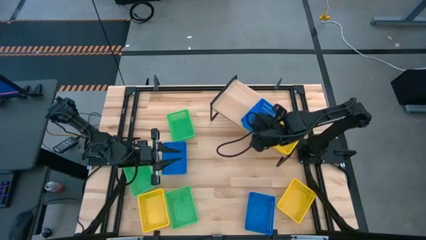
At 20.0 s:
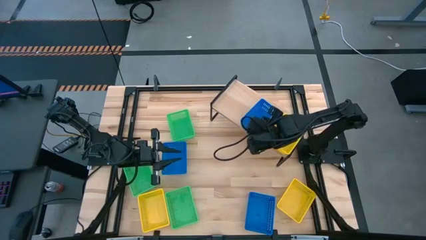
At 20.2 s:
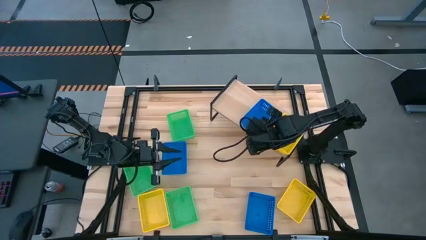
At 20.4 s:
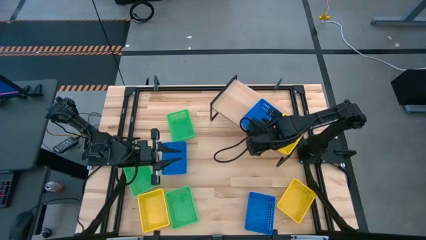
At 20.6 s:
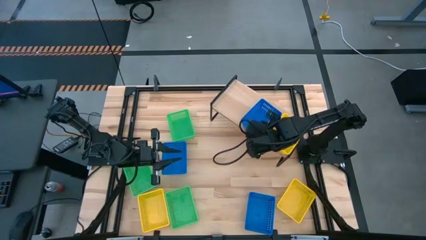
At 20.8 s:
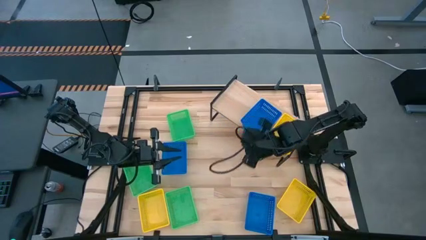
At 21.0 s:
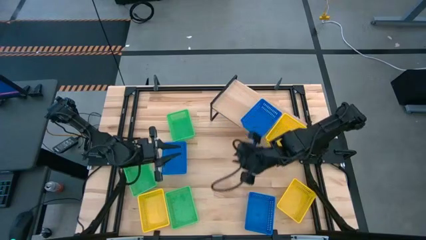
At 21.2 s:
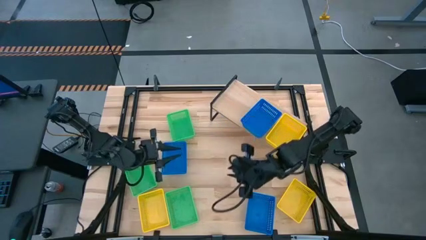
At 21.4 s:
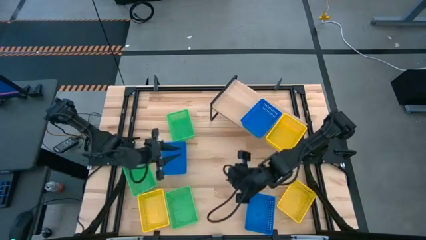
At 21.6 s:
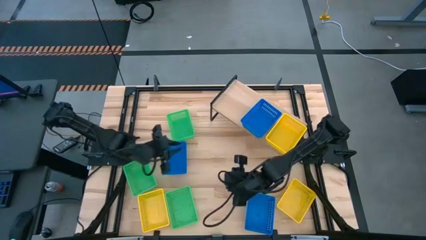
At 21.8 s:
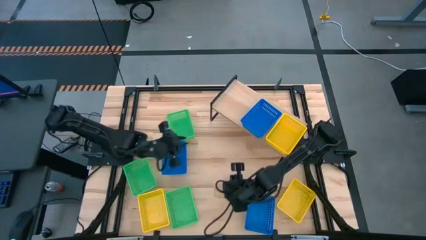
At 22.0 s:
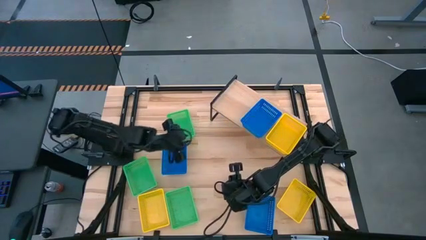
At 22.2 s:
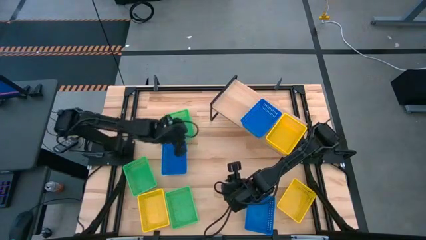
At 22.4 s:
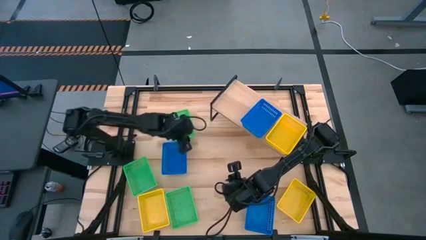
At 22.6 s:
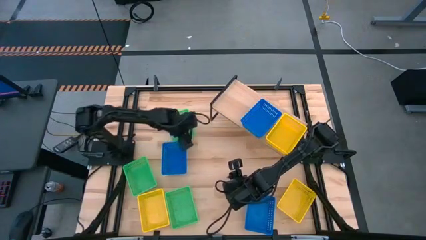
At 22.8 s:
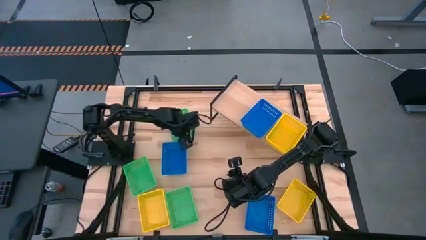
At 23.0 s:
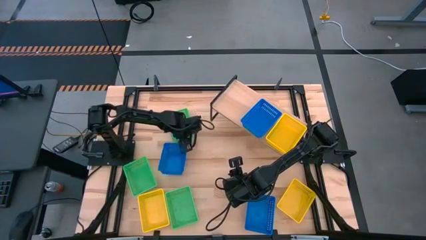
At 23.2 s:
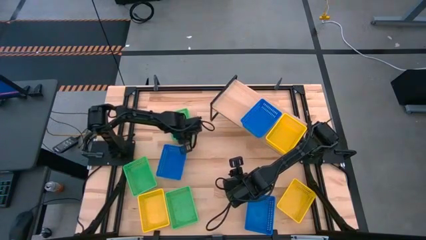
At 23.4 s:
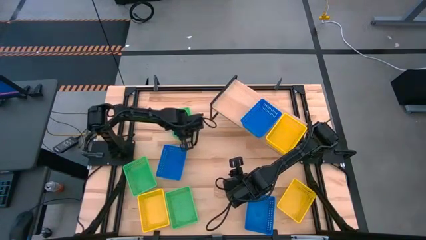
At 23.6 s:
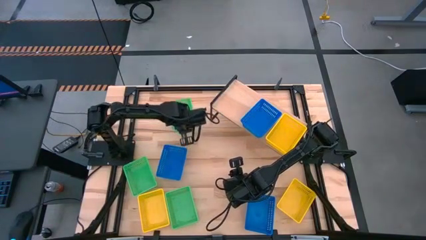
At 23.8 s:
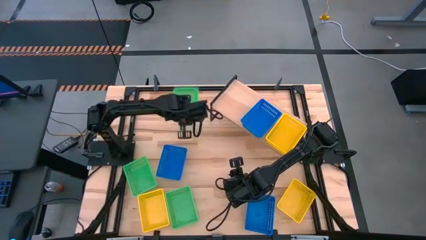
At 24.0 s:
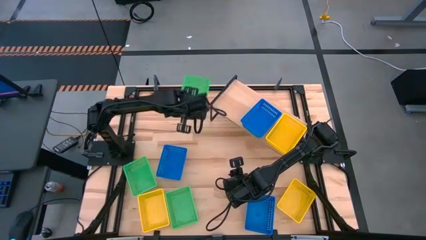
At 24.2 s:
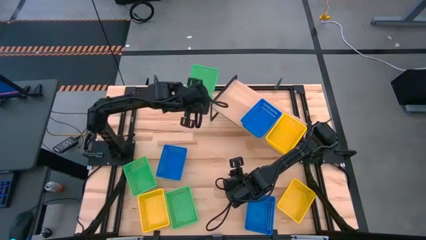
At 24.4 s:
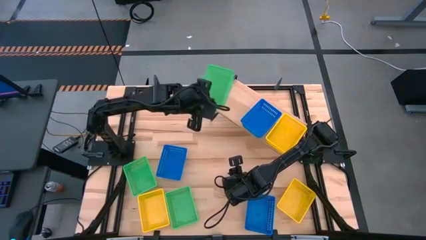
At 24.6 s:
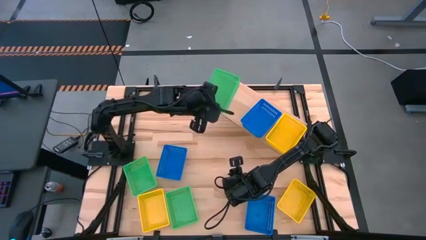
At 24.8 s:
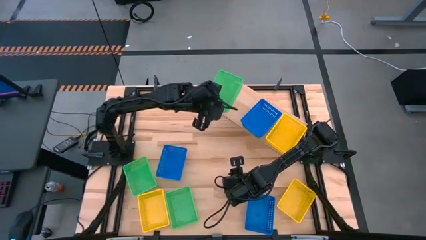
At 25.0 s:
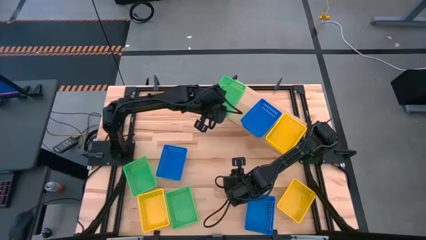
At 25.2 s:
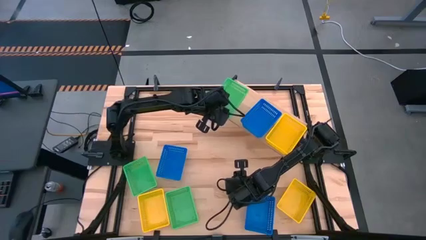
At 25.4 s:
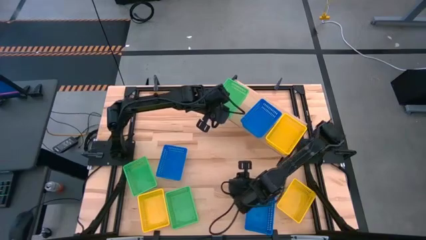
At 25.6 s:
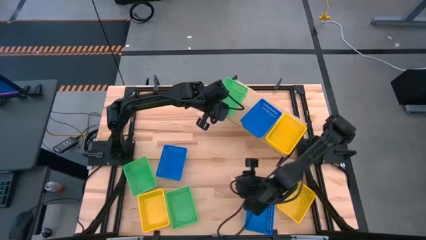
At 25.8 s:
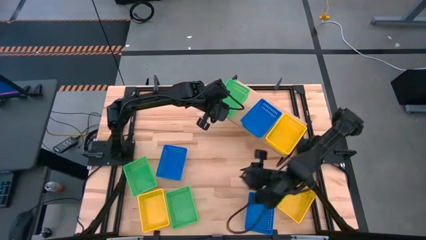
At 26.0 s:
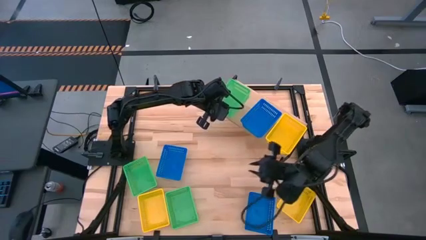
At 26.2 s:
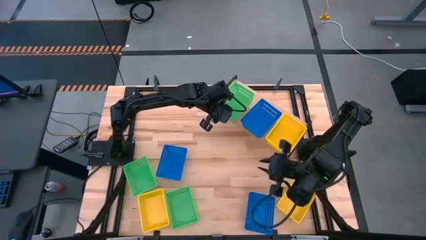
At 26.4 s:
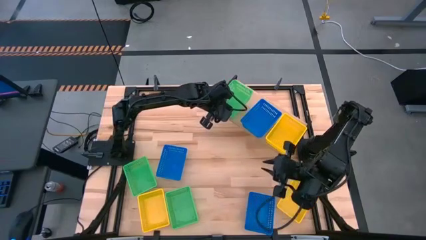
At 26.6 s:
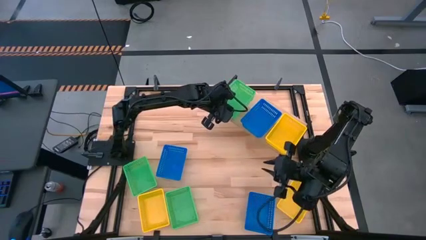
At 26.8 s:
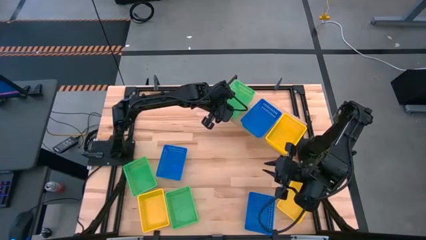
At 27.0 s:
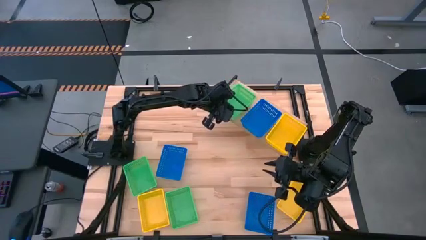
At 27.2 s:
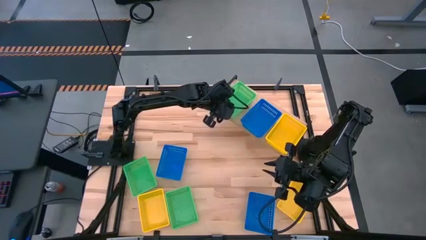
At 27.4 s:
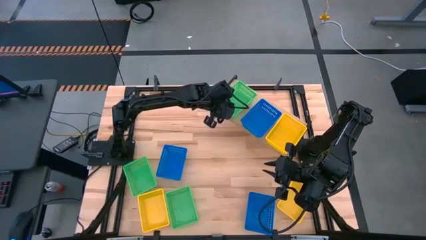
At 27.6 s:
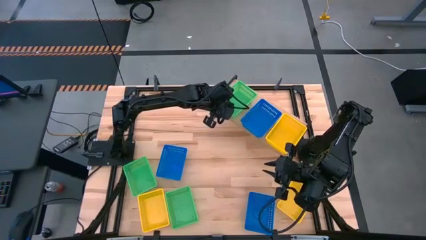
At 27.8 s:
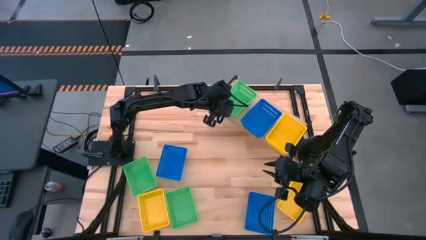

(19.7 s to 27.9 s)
Task: Stack baskets on shelf by color
Put the top green bin on the shelf

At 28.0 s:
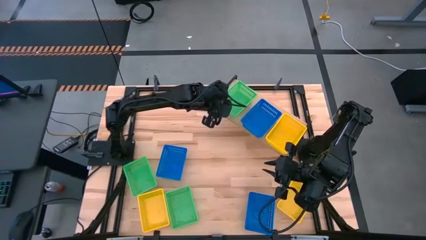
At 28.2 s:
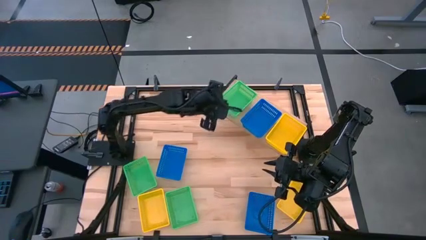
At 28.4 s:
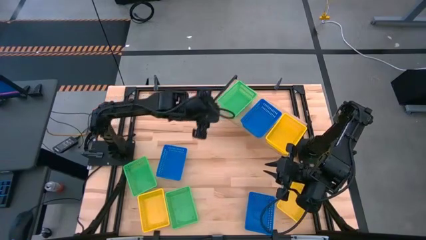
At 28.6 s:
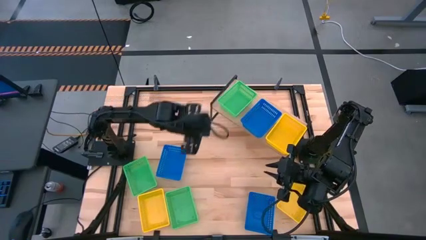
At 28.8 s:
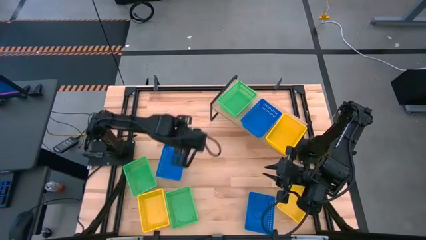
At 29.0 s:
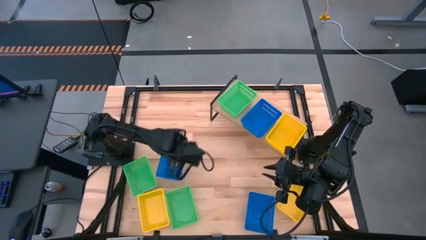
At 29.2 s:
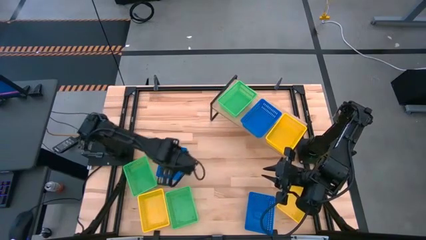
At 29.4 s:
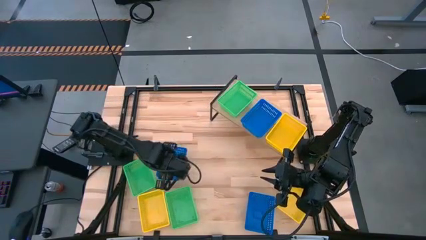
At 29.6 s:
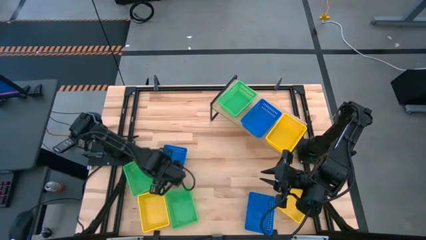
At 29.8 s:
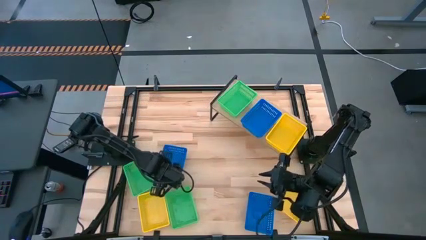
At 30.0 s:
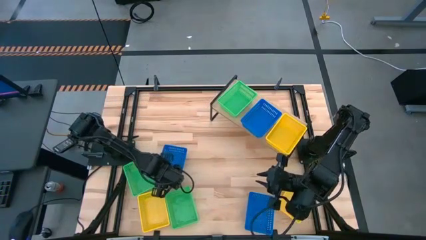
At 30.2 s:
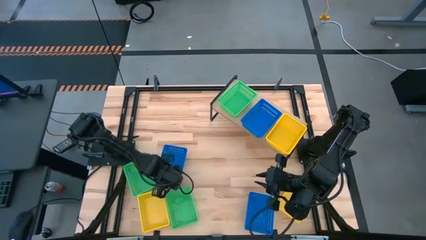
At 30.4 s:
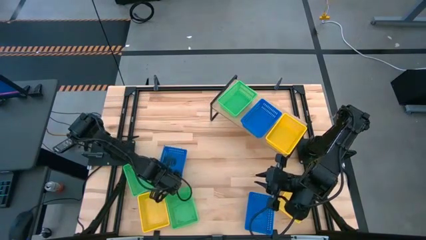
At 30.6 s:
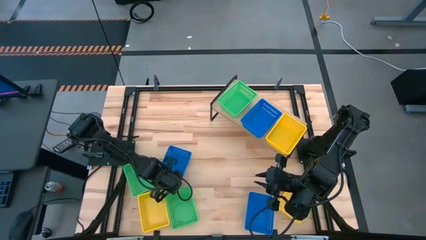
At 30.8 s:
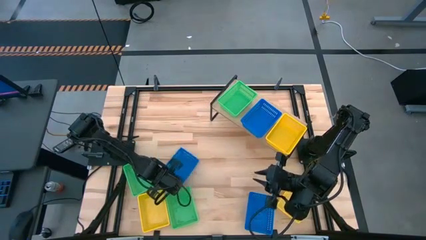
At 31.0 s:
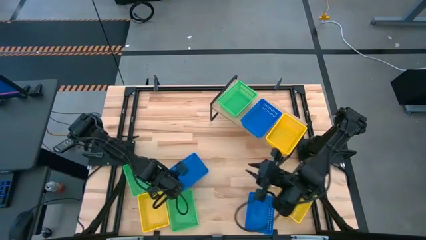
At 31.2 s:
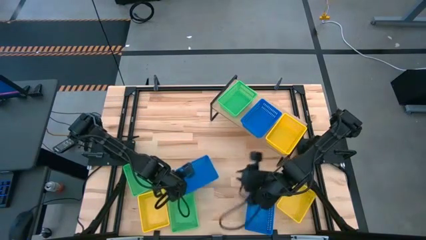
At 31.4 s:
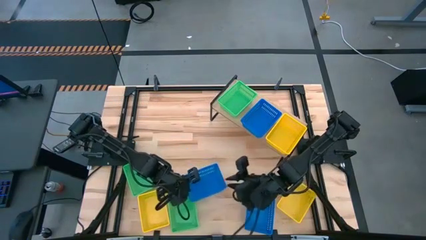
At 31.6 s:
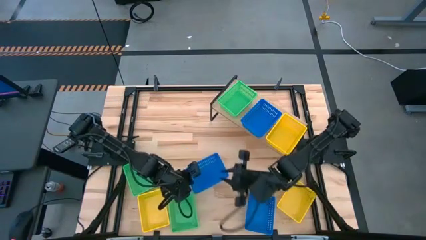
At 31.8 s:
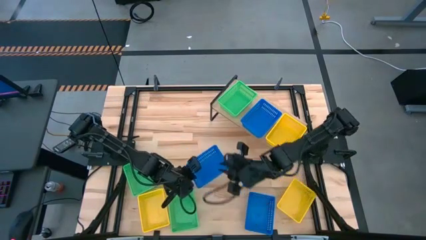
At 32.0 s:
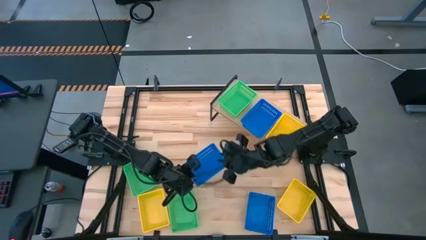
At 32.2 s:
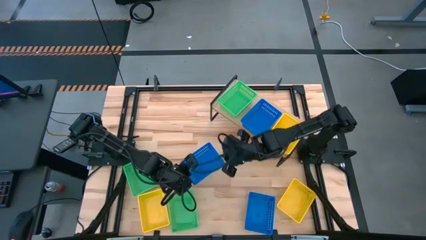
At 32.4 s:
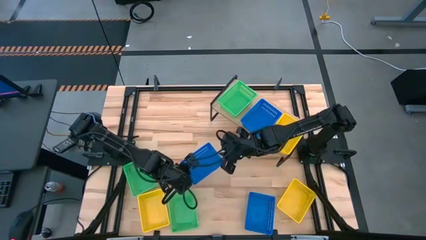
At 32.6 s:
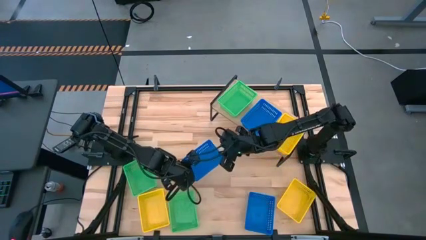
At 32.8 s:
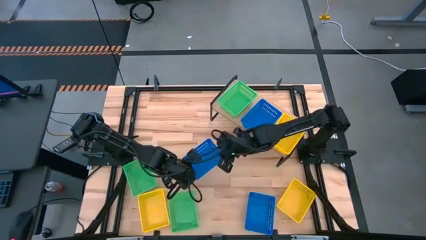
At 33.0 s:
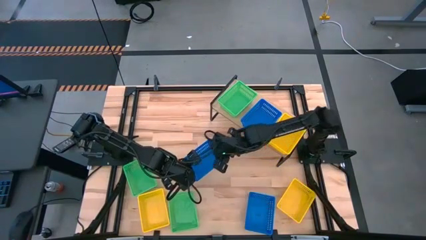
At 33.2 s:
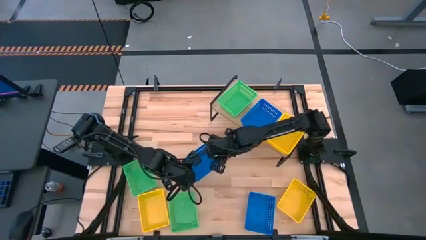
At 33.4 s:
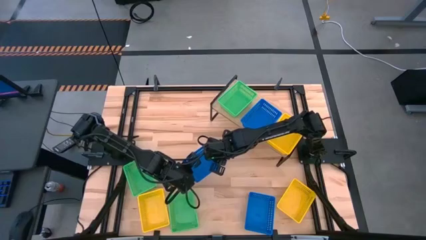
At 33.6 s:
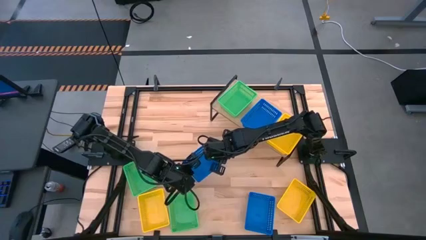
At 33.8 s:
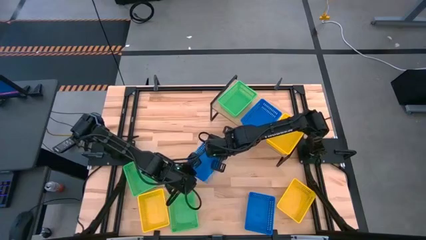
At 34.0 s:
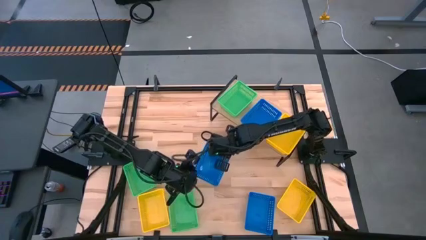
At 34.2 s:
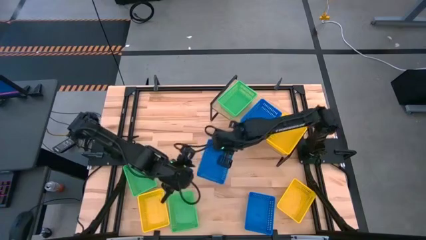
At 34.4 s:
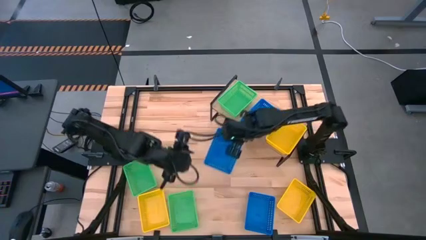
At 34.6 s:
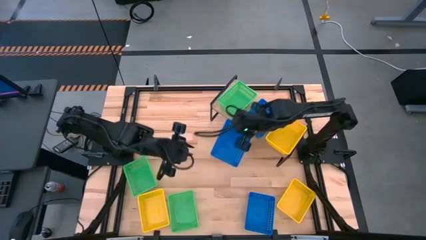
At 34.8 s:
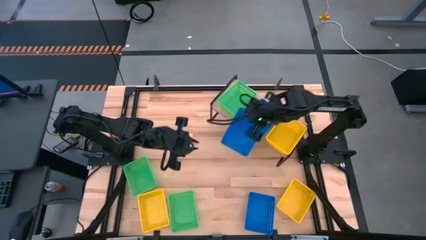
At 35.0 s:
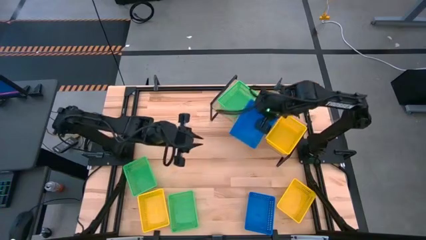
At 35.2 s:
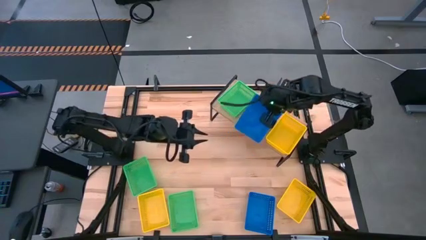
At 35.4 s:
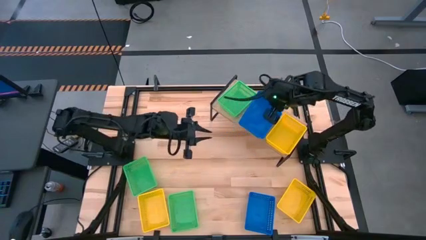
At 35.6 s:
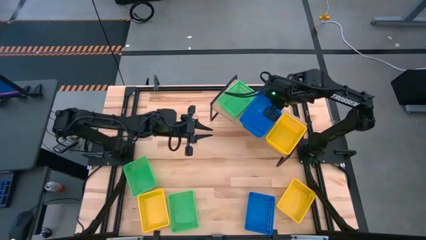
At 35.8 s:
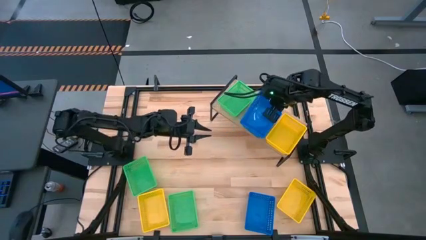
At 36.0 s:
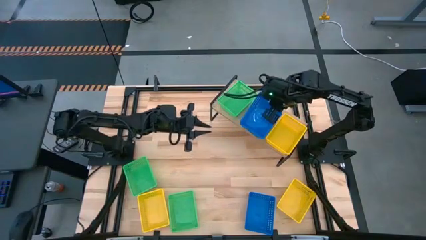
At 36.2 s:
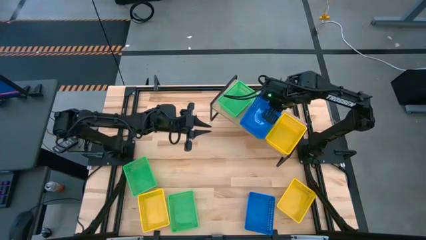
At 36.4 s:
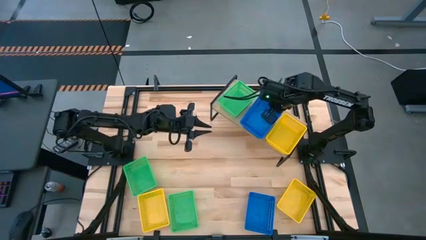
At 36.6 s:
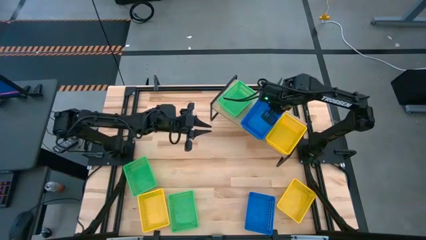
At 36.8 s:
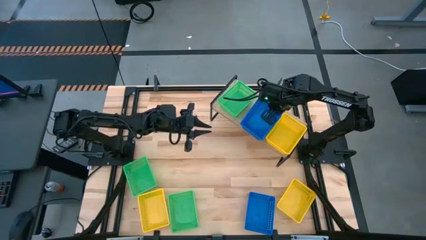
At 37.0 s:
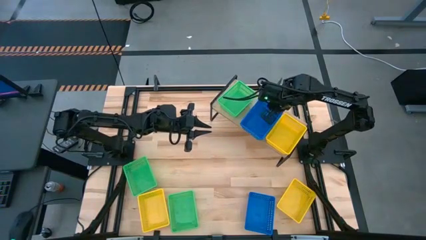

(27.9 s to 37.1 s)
Stack the top blue bin on top of the blue bin on the shelf
